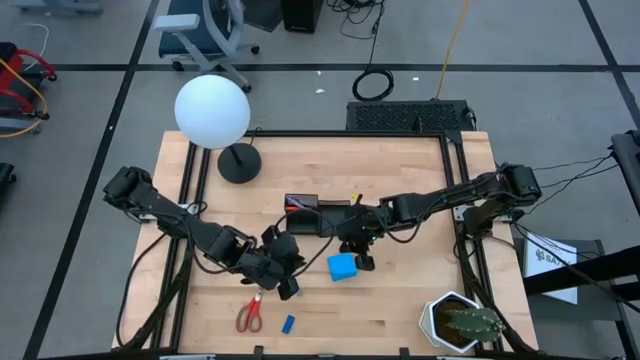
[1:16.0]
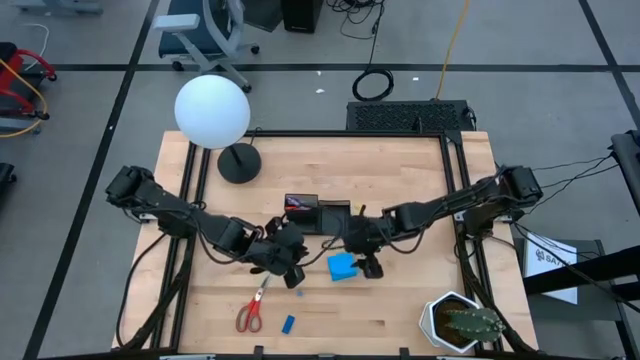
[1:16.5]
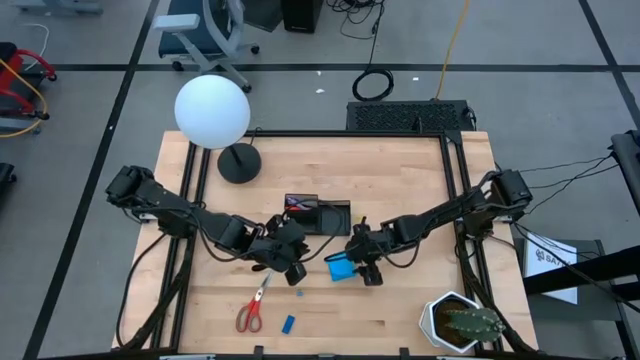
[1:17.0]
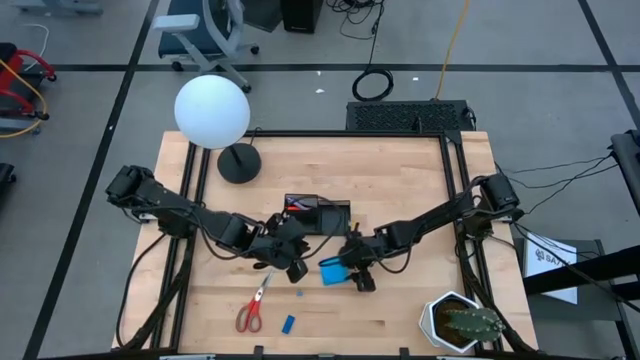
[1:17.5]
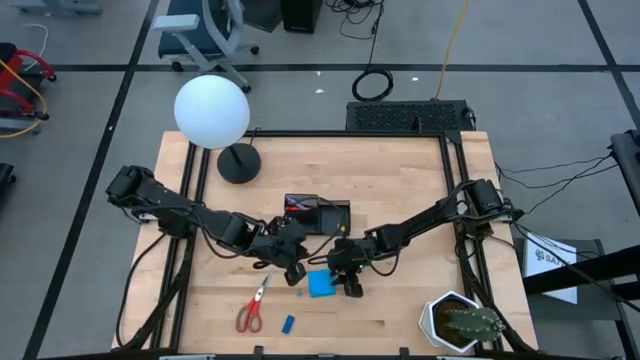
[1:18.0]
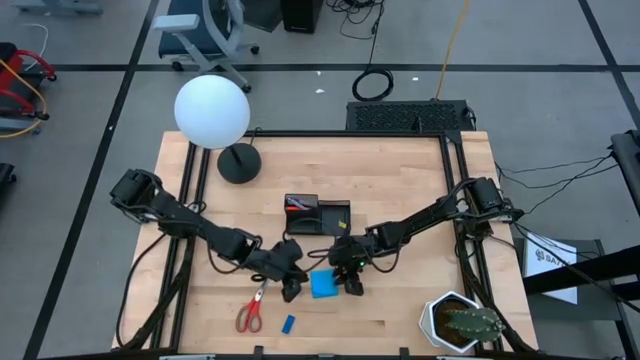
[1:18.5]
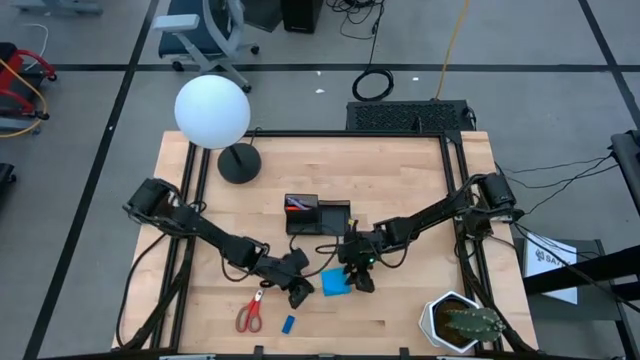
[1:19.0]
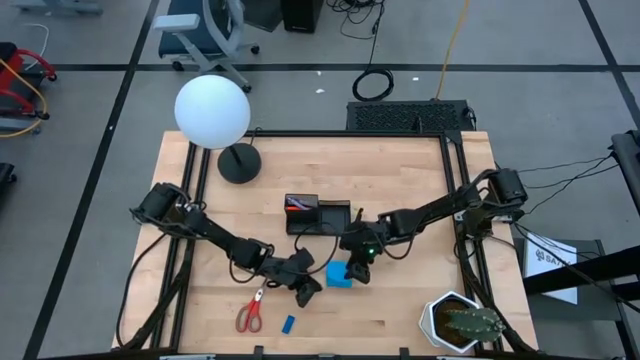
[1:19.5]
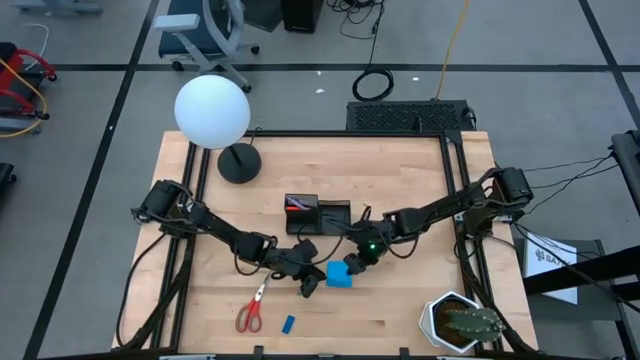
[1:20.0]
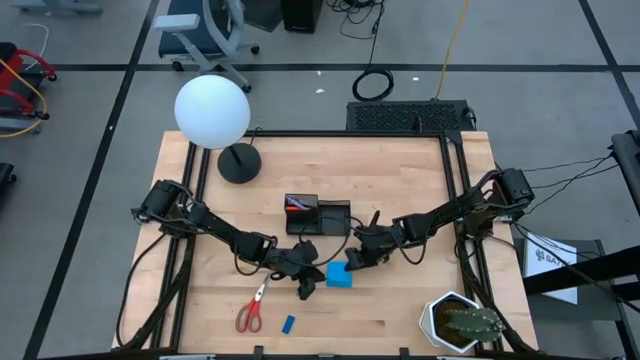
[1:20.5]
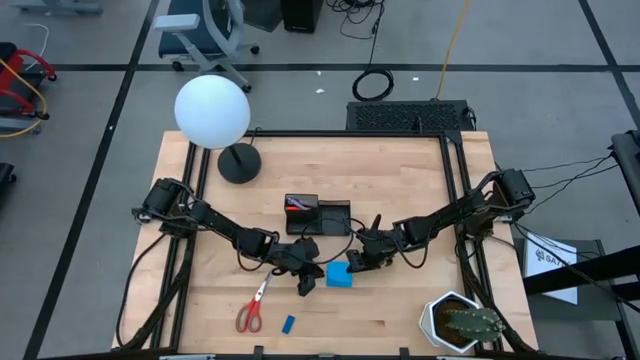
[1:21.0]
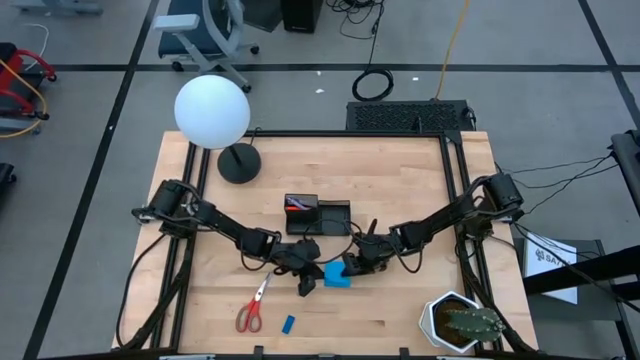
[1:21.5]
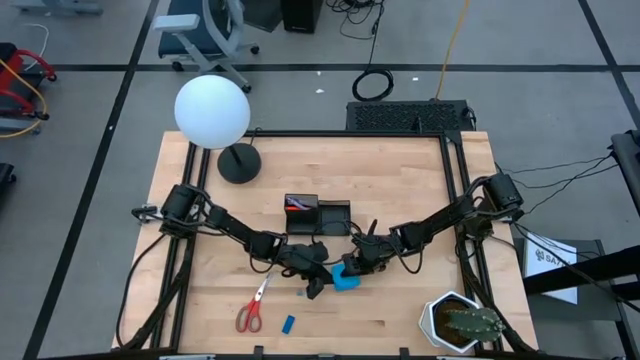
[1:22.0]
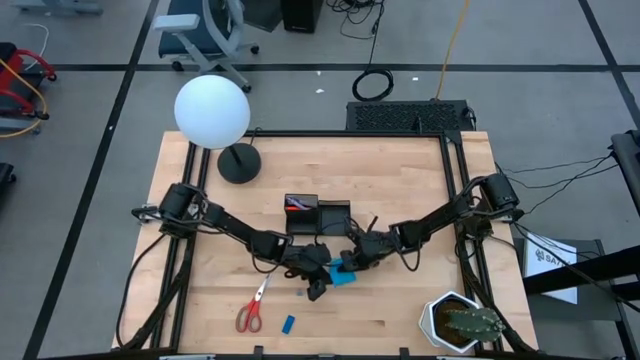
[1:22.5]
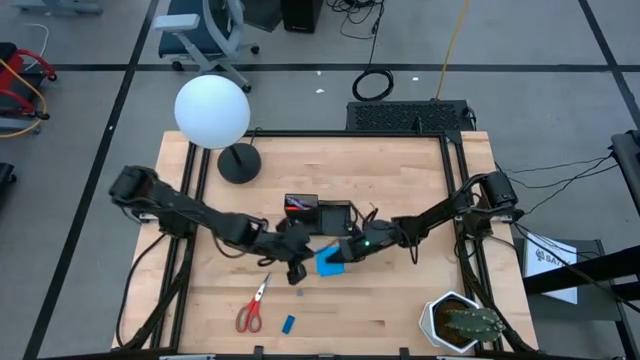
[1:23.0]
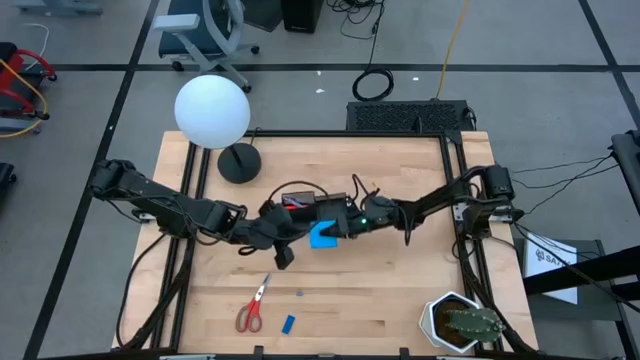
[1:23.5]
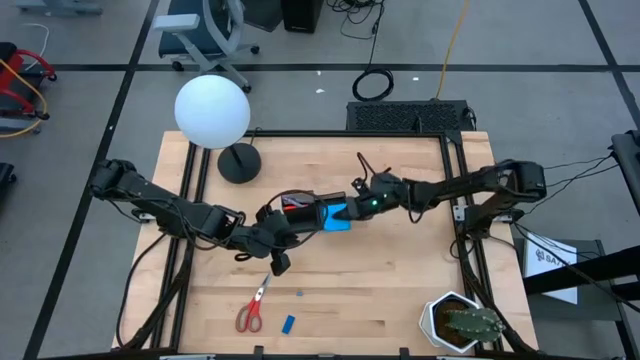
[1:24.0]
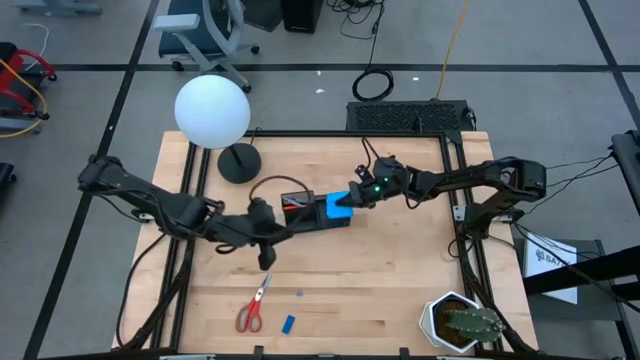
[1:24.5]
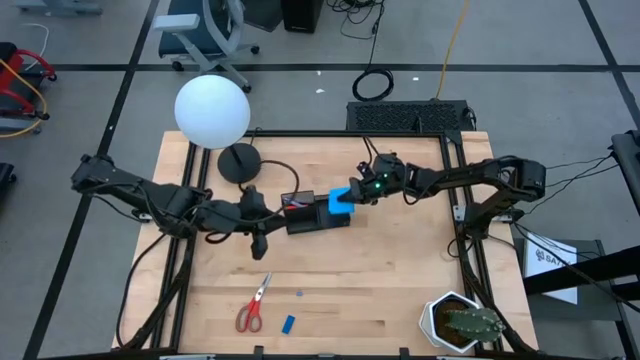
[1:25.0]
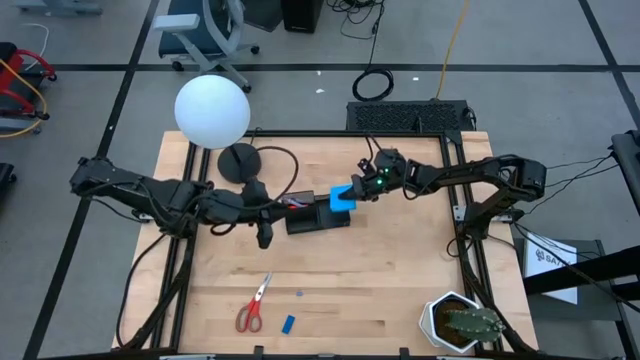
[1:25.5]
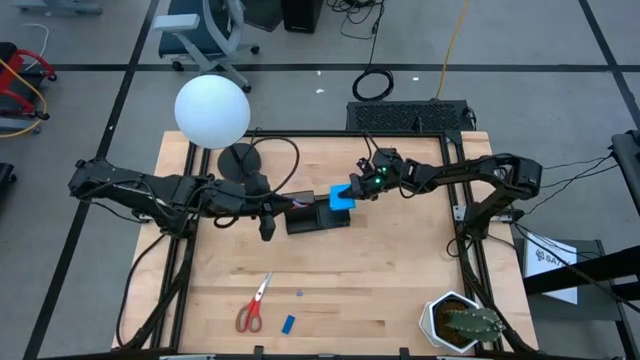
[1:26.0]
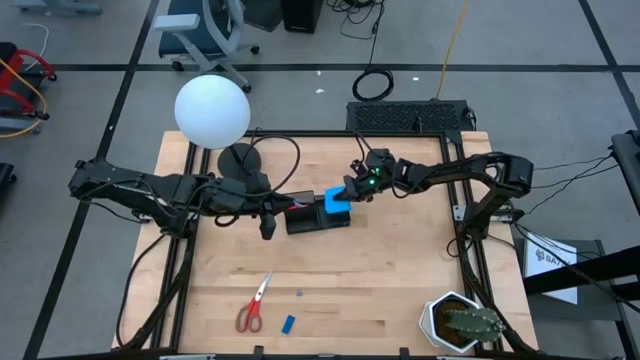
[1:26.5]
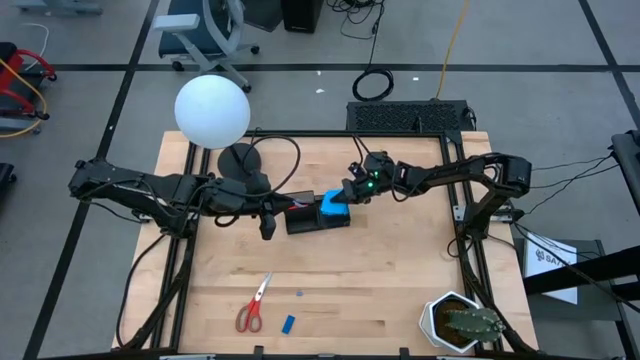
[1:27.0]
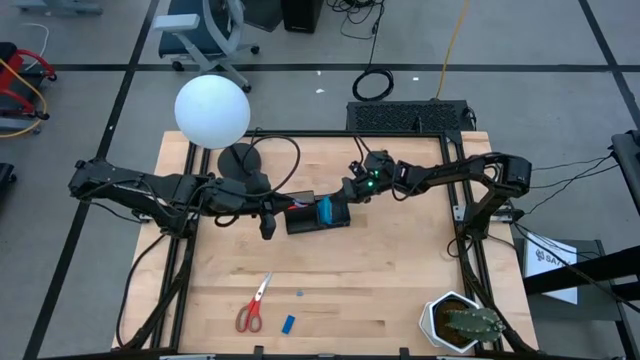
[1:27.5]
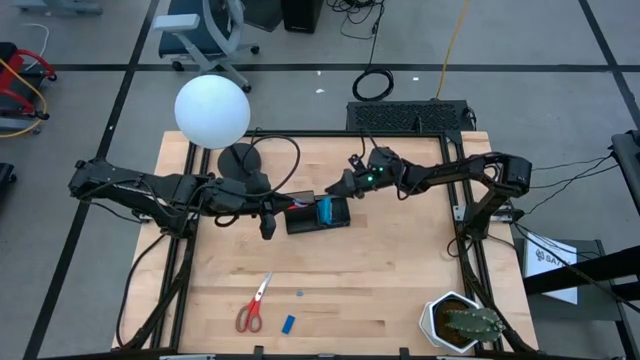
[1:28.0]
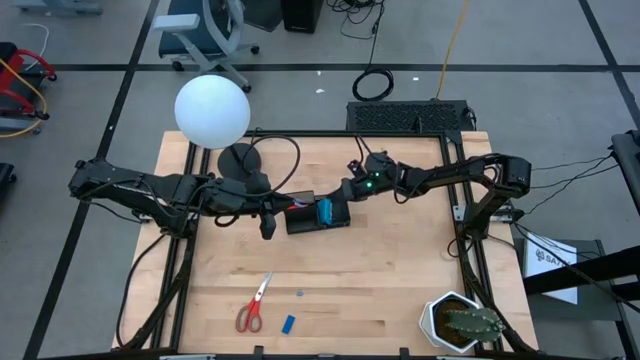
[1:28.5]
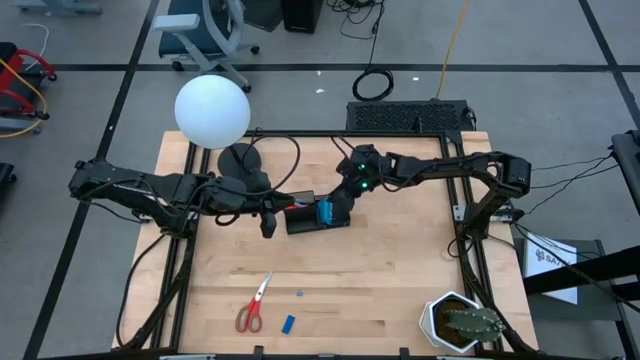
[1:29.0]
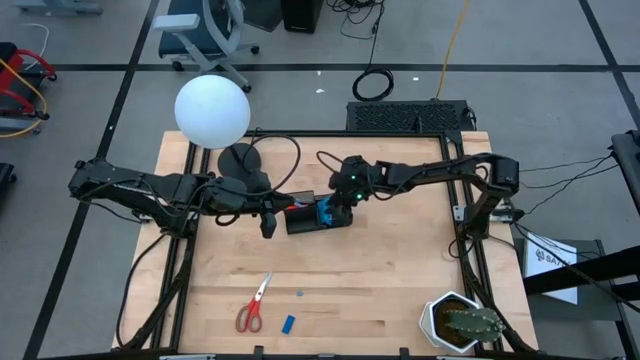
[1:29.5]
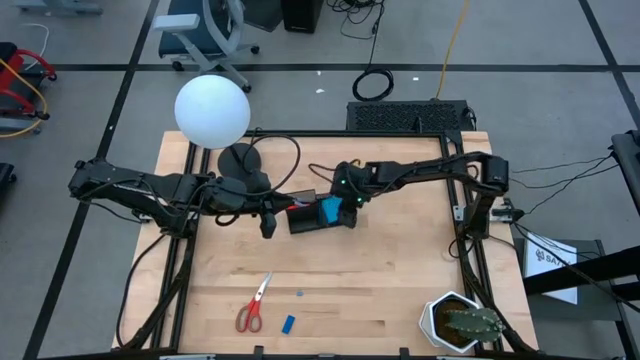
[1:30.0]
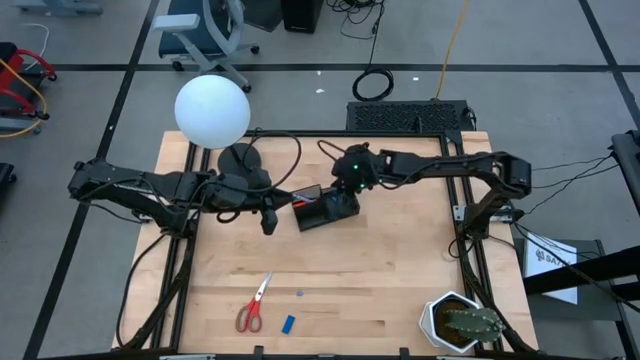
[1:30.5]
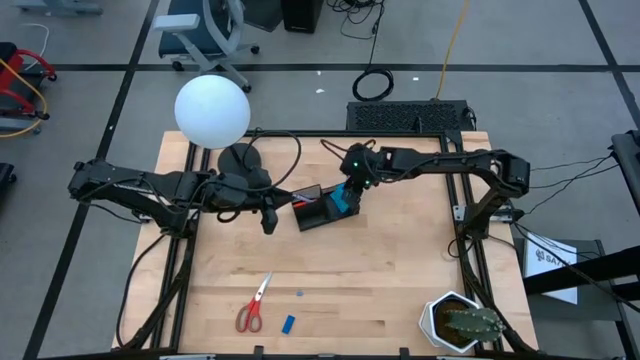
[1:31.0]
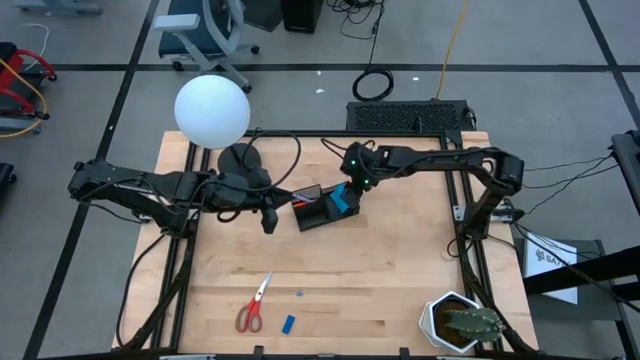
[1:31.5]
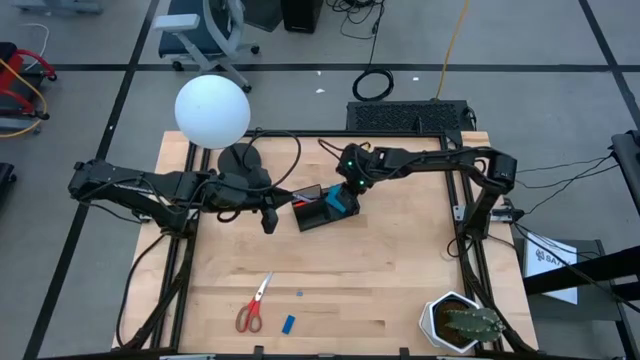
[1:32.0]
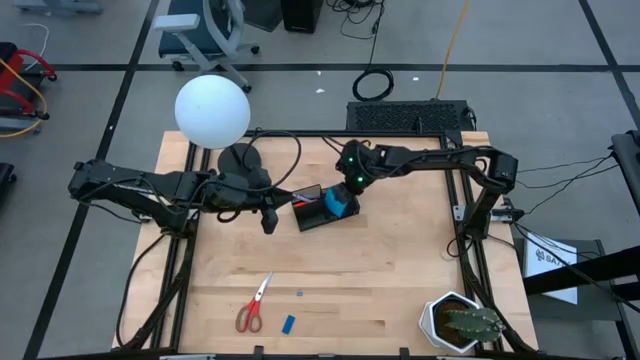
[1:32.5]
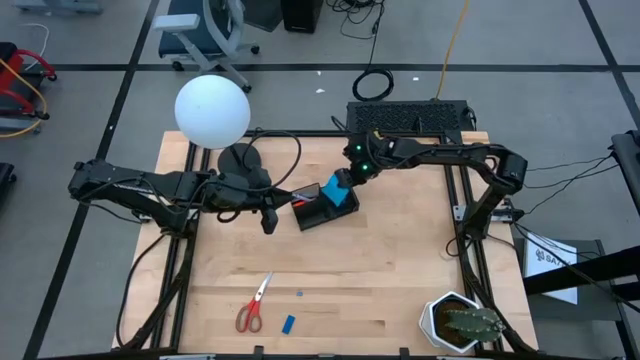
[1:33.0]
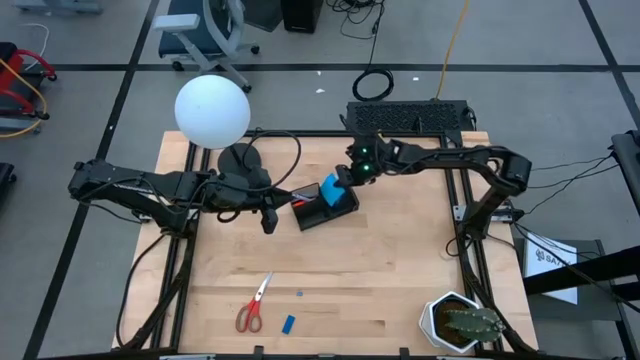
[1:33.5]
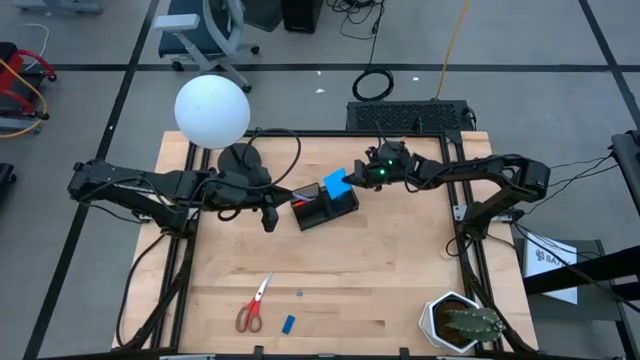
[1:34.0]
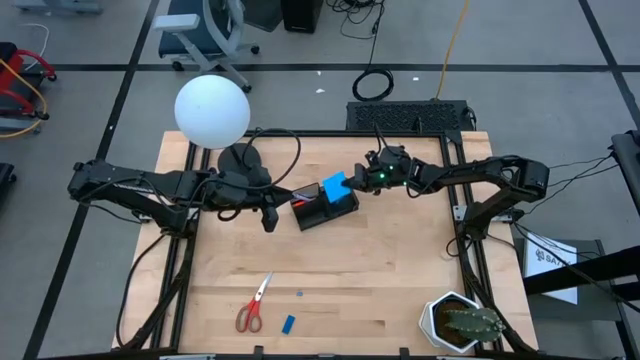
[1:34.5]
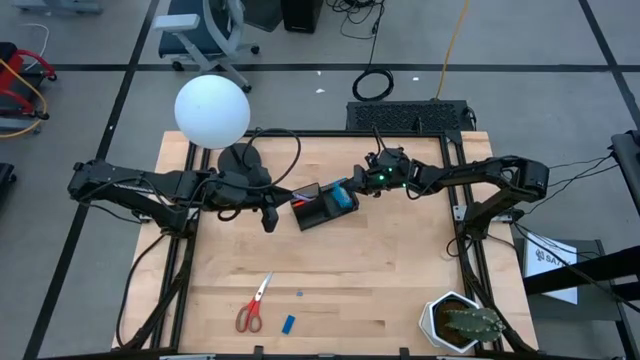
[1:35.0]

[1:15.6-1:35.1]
Task: Pick and place office supplies into organizer
Put the blue sticky note into the desk organizer

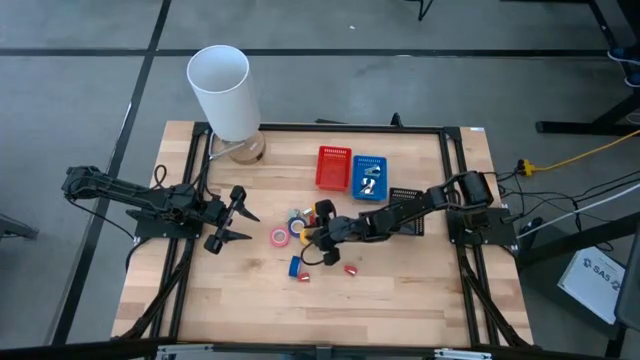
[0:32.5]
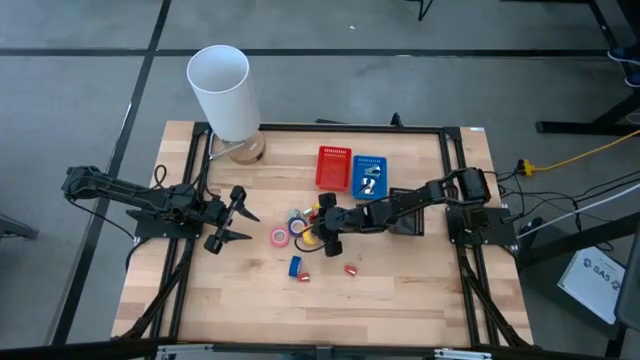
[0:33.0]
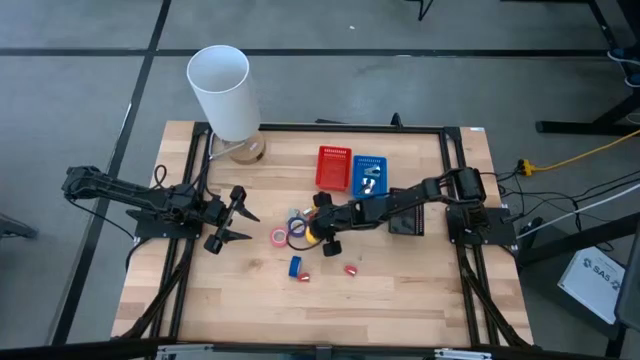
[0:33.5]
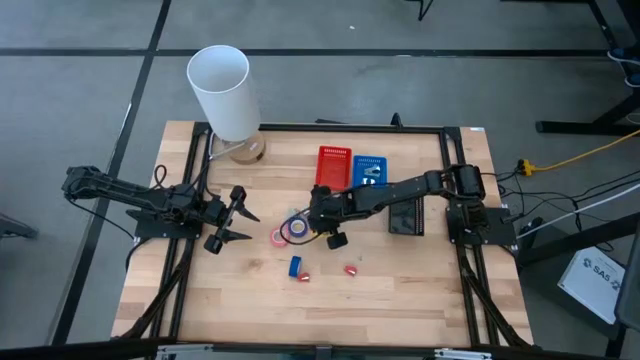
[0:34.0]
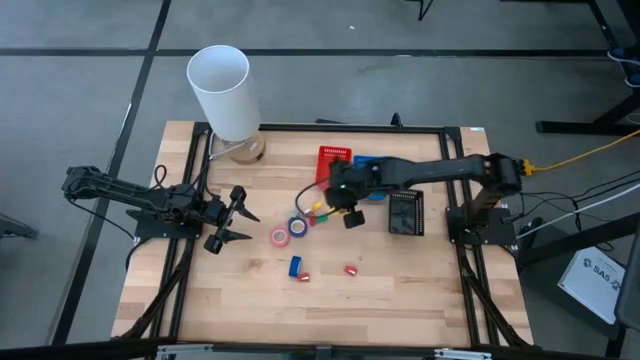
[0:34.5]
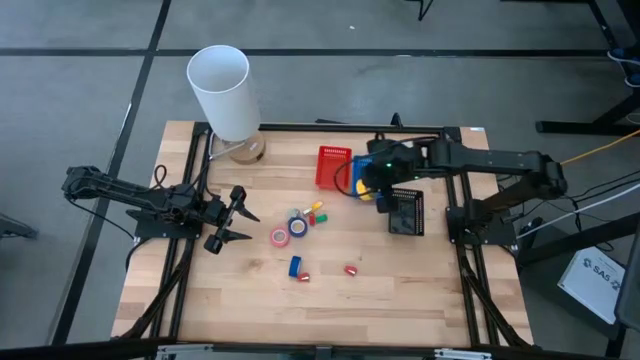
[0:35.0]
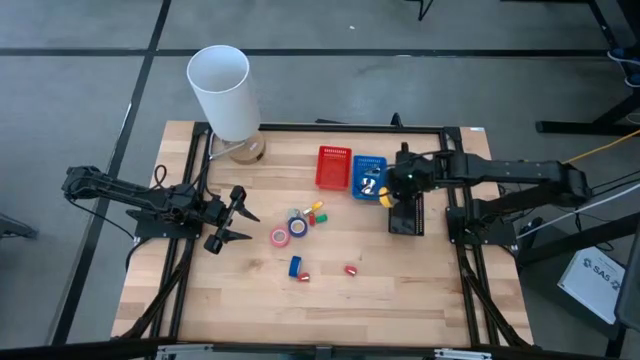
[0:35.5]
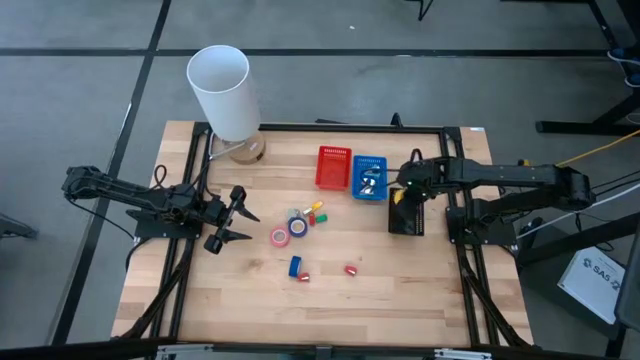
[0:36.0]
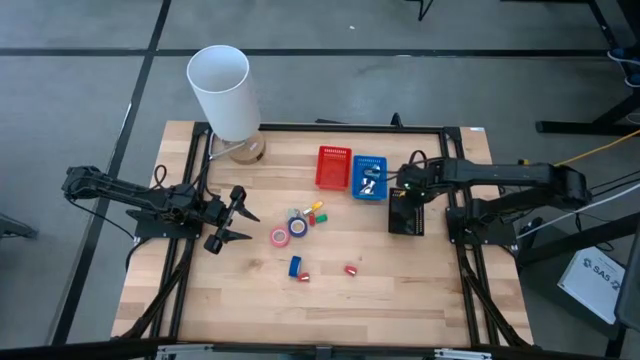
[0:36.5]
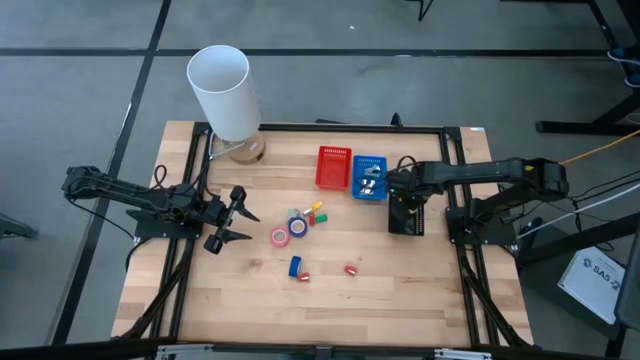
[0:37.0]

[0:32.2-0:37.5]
Task: Pick and place Stapler, Stapler remover, tape
Put the yellow tape into the black bin
